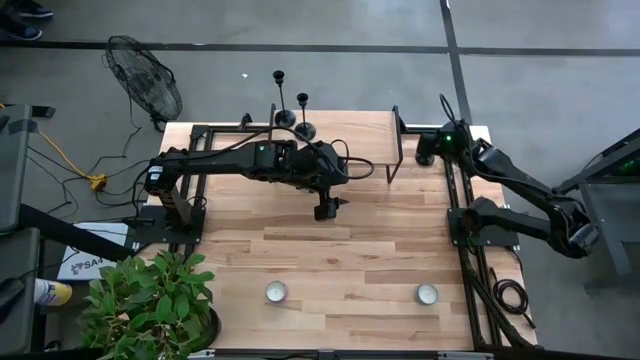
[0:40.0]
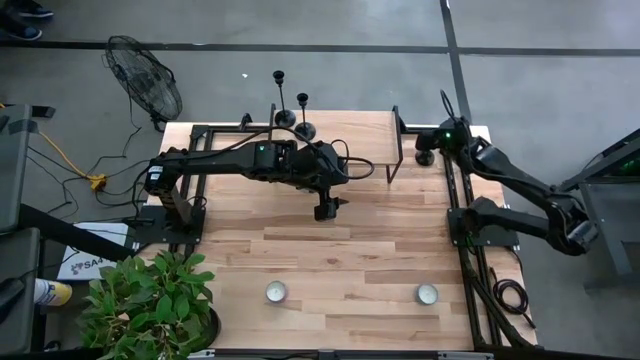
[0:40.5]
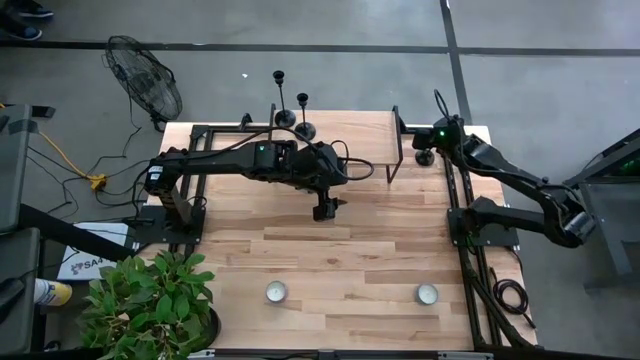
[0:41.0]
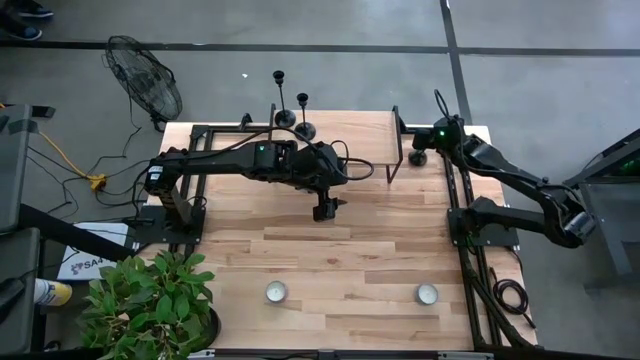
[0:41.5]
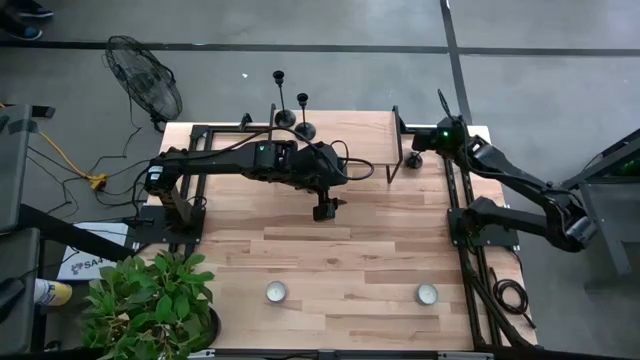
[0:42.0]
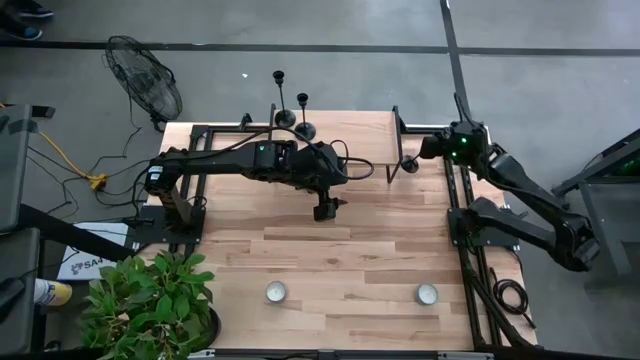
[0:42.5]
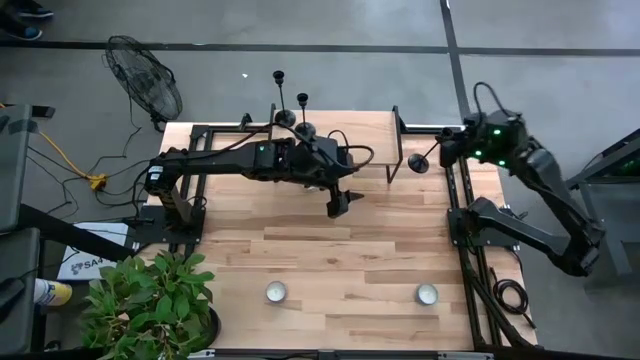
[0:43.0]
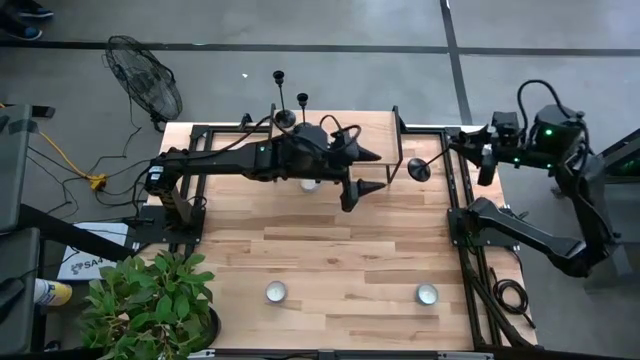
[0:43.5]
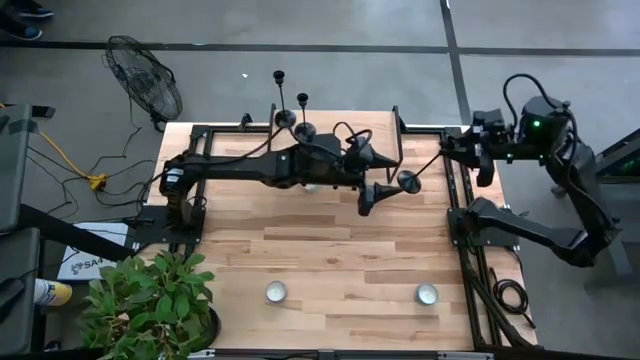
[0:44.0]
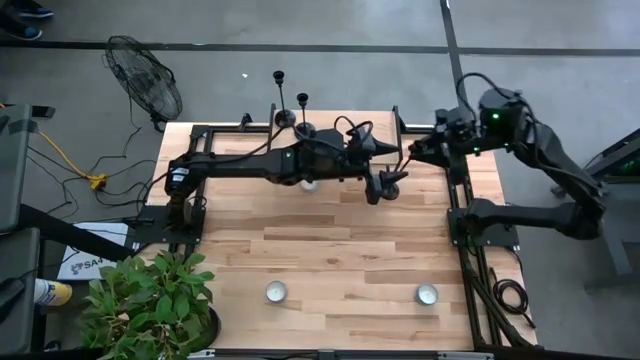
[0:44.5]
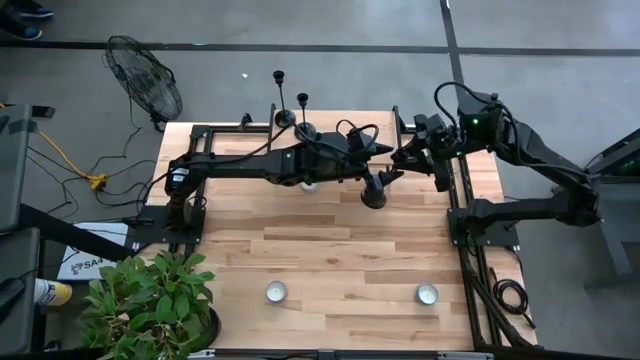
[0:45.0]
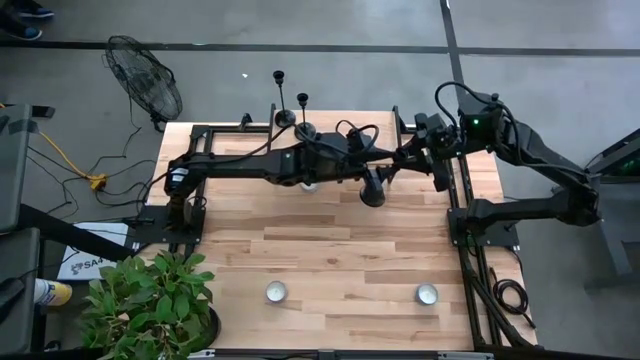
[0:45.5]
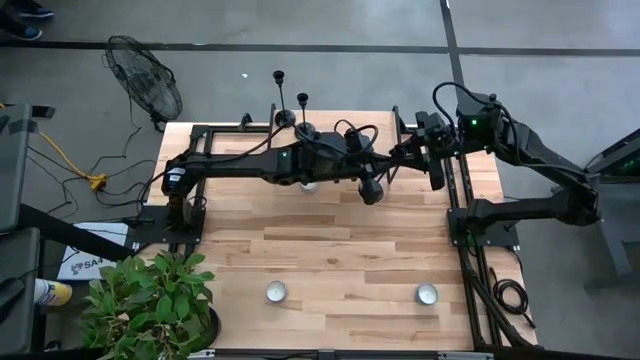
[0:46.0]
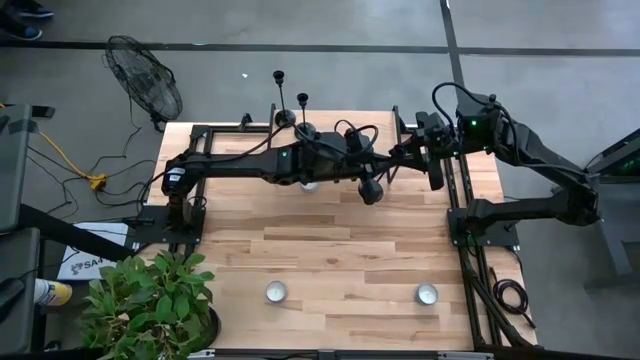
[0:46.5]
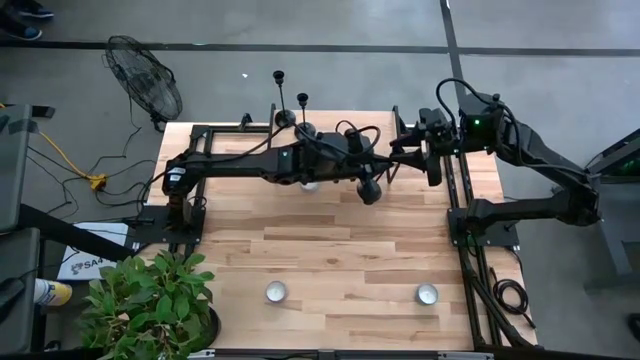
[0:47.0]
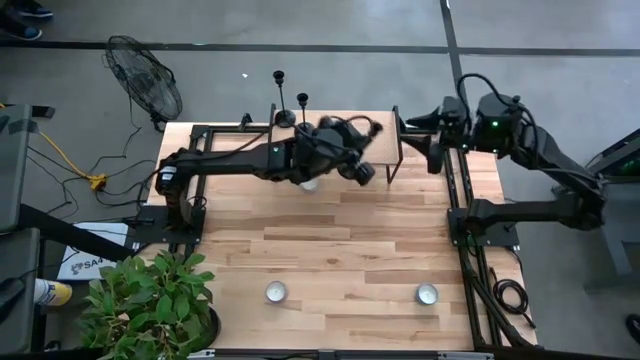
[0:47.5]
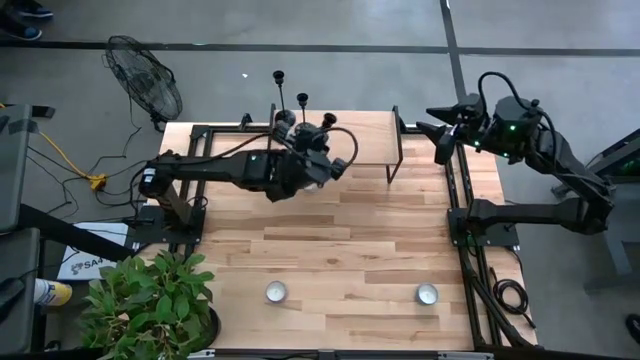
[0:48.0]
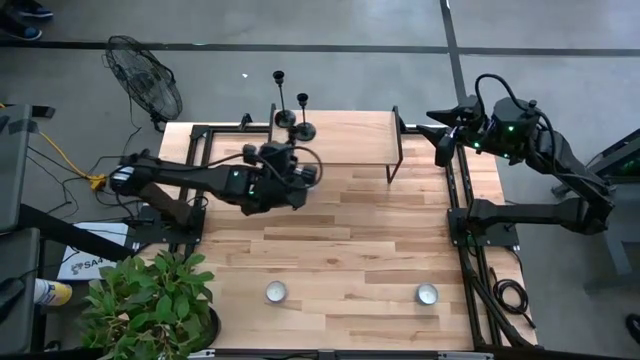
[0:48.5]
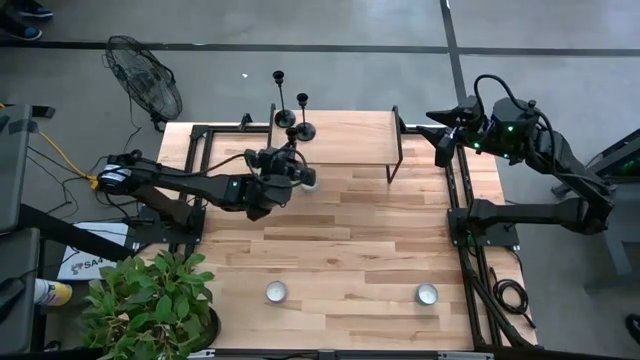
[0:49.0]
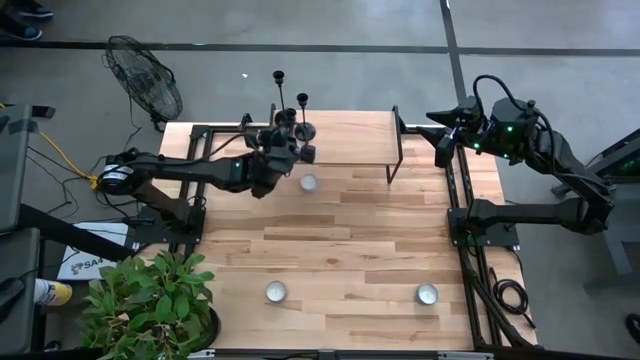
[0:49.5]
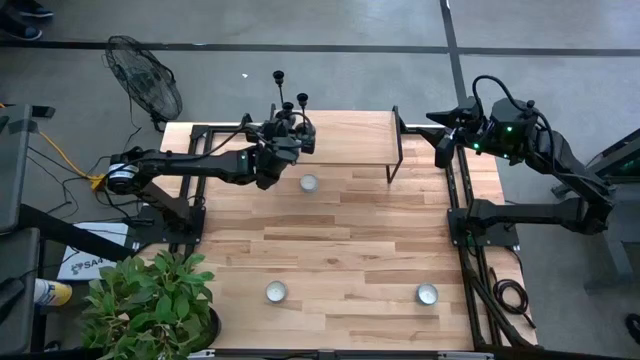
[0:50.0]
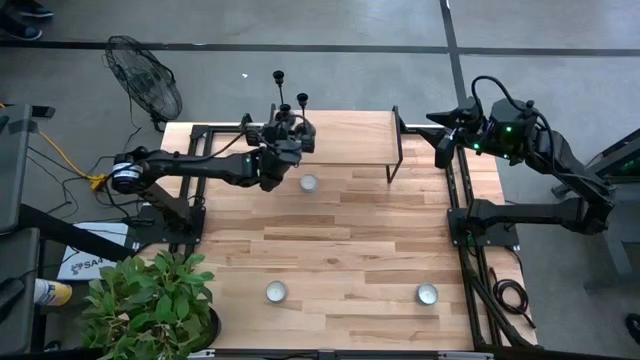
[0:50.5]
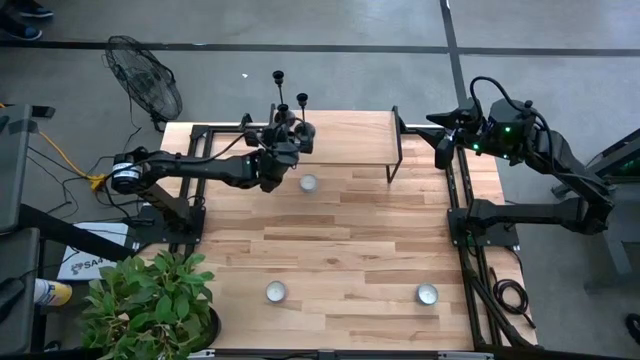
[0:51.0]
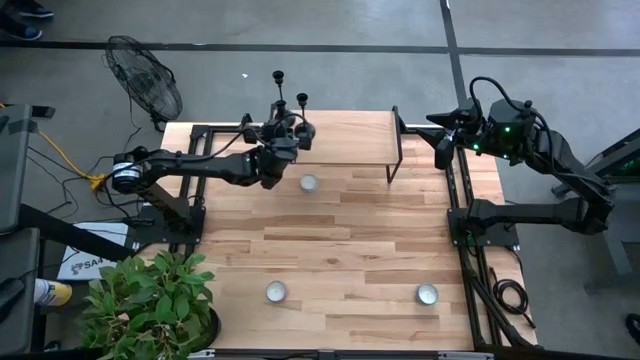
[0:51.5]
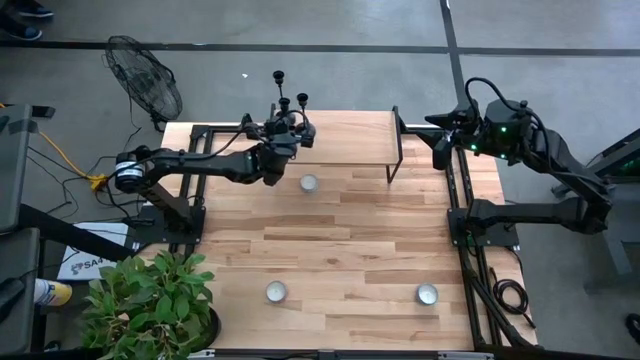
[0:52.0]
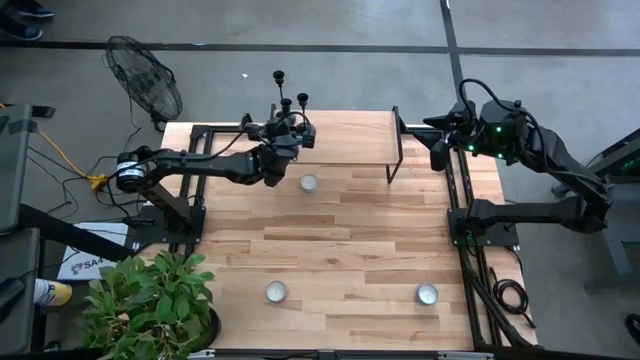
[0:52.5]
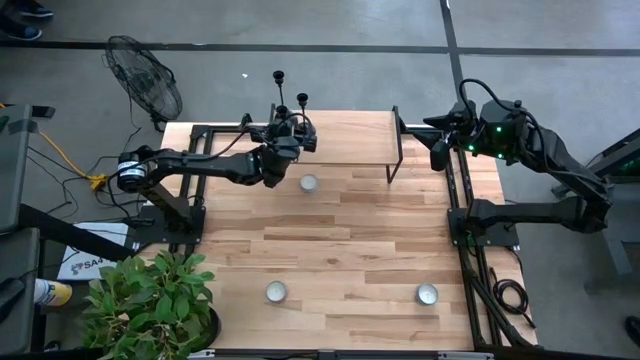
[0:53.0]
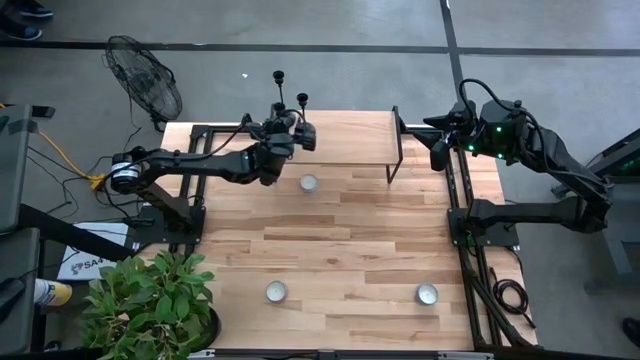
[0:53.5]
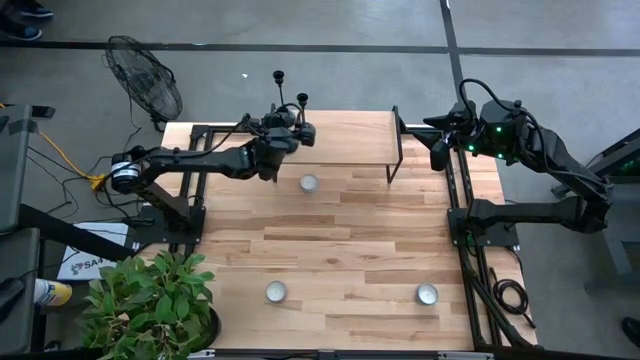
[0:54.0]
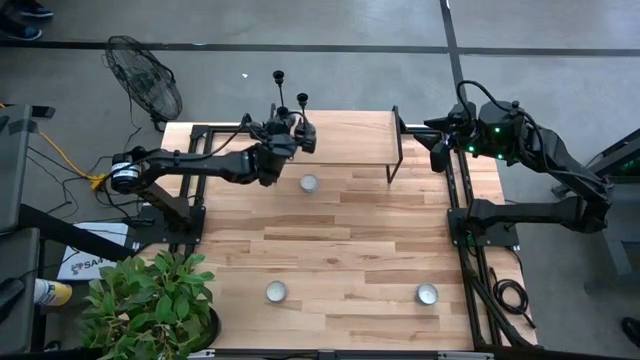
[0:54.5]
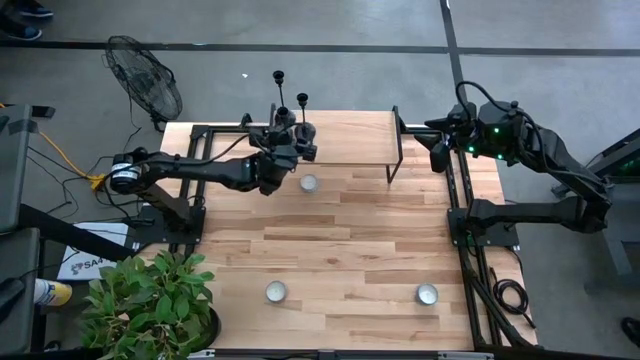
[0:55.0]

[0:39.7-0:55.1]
Task: Pick & Place candle stick holders
Put the black candle holder on the shelf

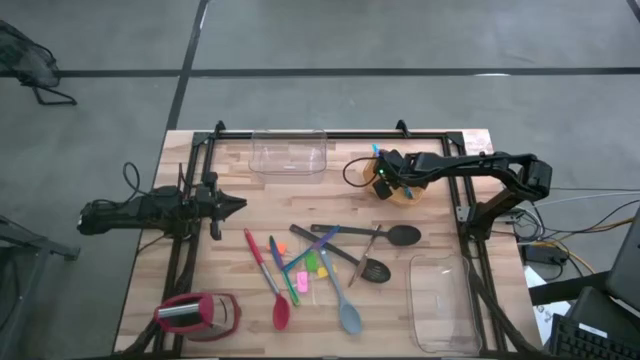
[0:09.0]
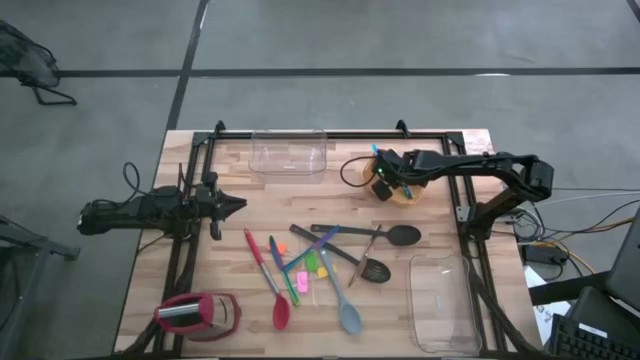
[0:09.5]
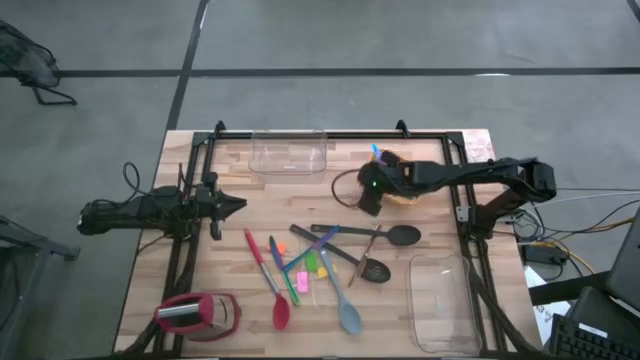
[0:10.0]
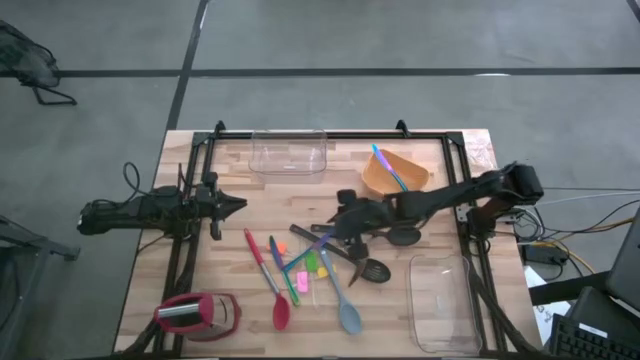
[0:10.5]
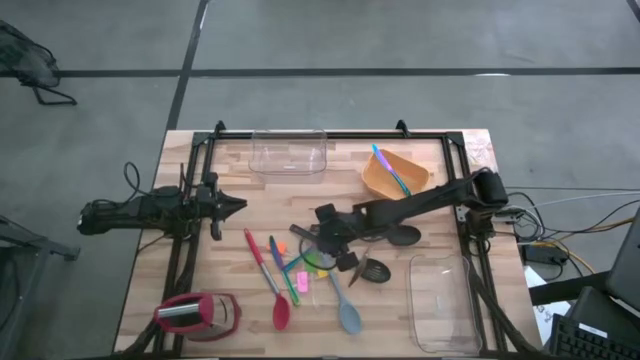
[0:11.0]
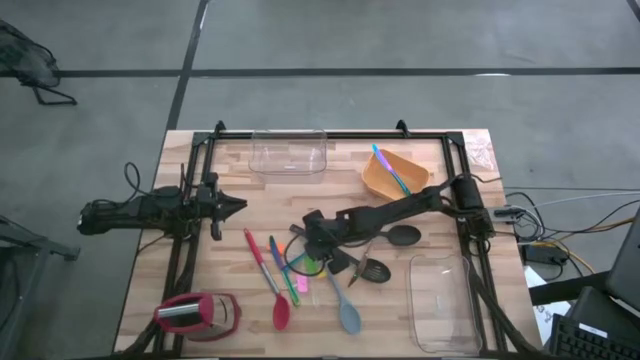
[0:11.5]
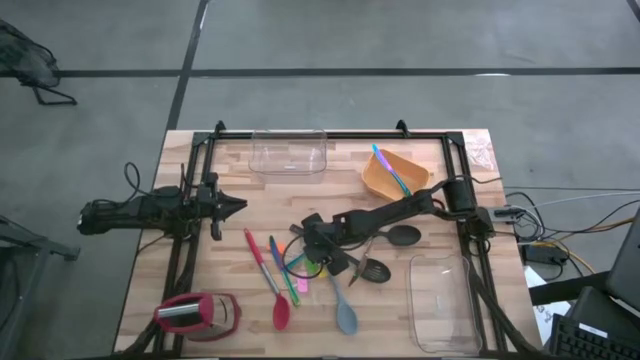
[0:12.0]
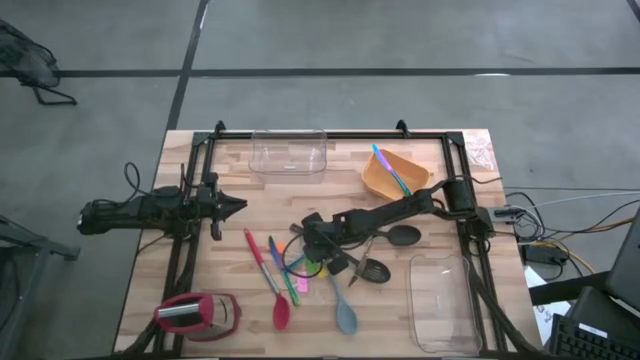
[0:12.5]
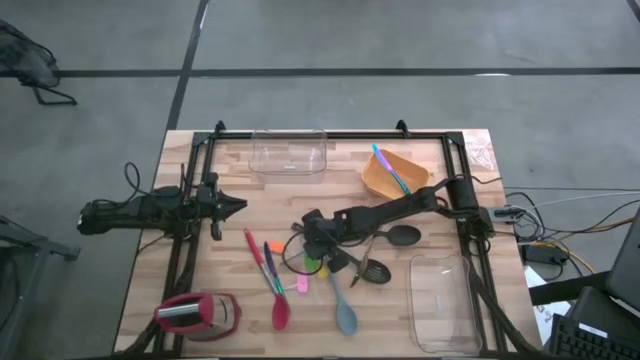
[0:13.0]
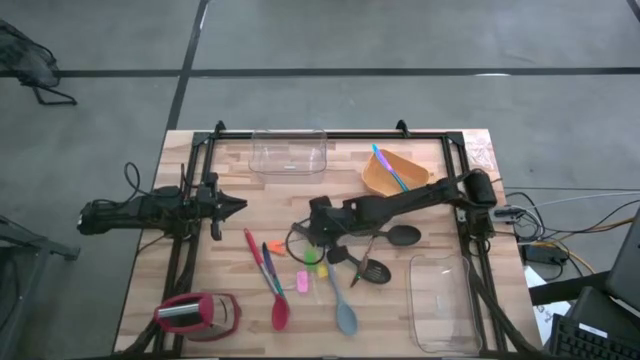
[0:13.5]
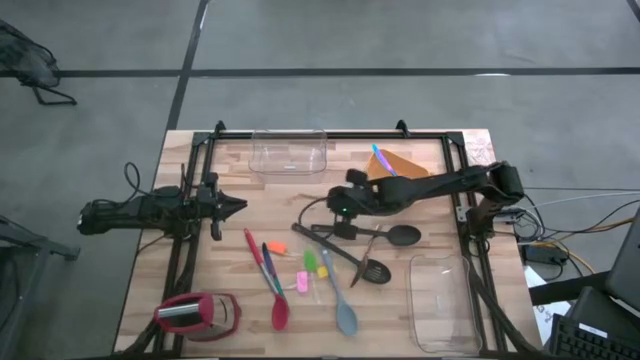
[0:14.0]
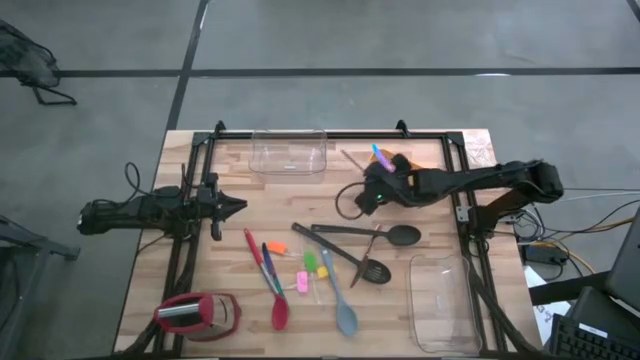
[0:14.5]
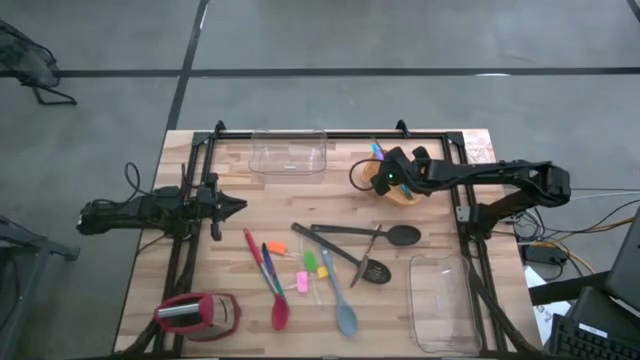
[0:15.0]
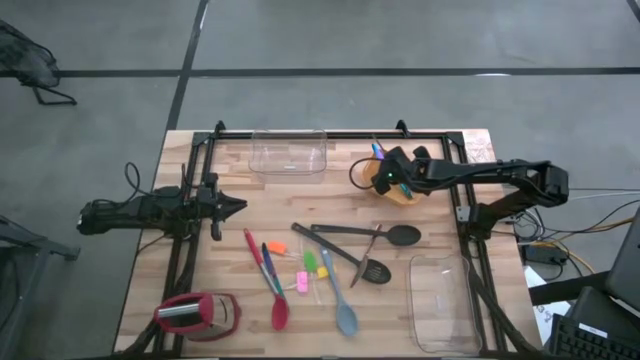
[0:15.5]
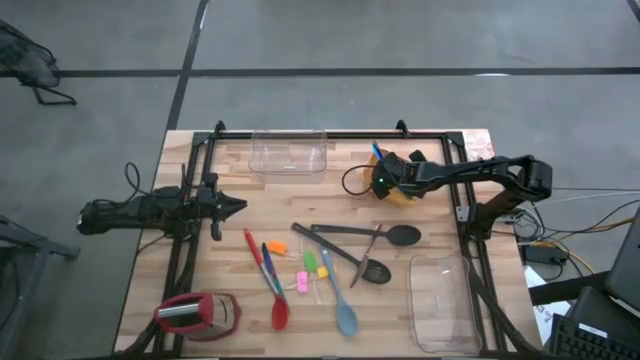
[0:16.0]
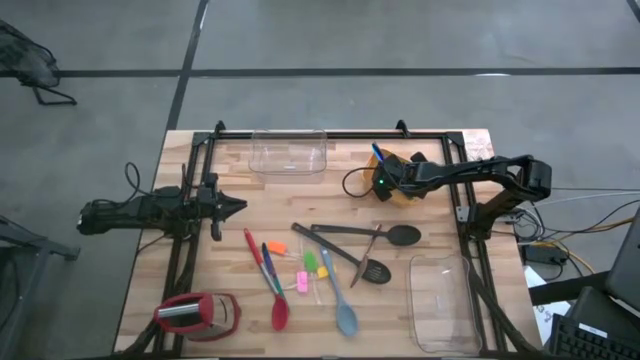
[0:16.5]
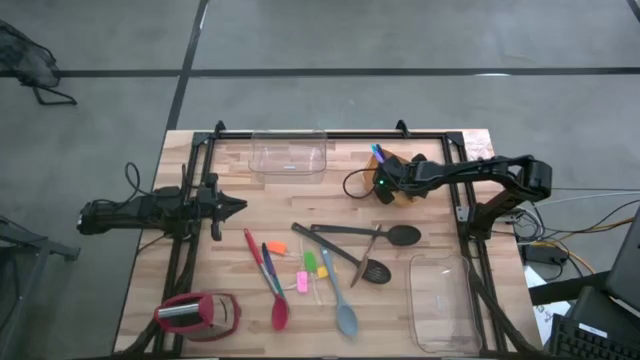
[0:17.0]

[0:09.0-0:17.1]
Task: Pick & Place Kitchen Items
Put the blue kitchen knife into the yellow bin
